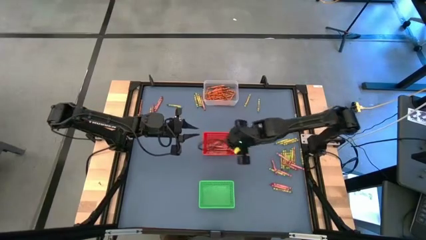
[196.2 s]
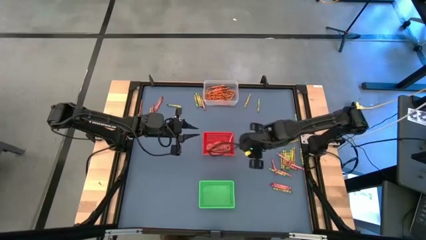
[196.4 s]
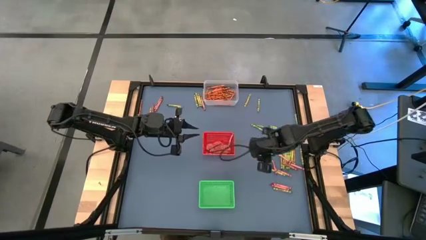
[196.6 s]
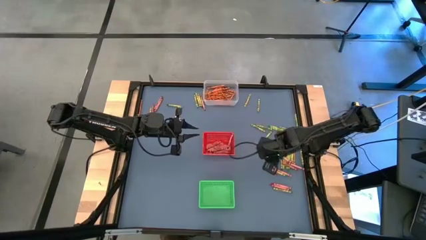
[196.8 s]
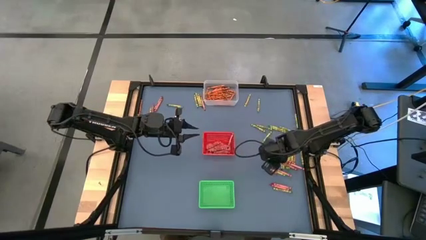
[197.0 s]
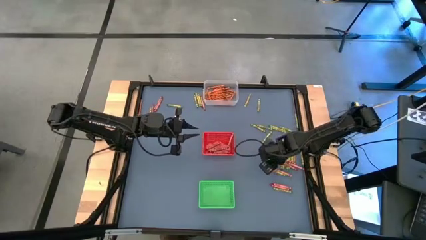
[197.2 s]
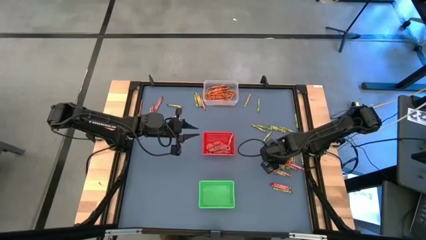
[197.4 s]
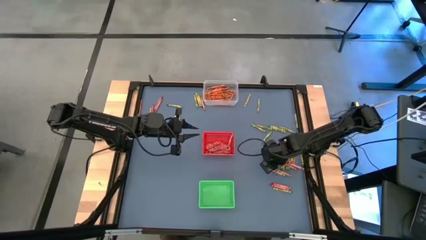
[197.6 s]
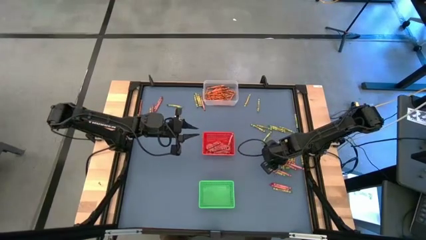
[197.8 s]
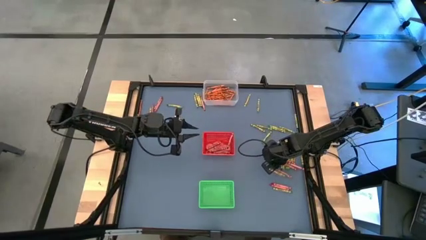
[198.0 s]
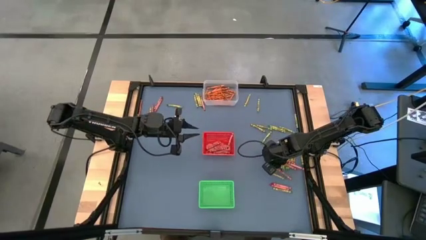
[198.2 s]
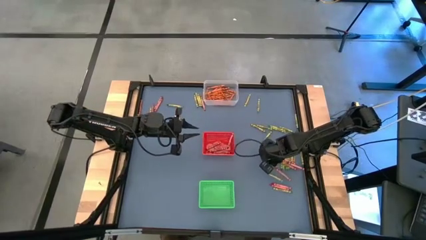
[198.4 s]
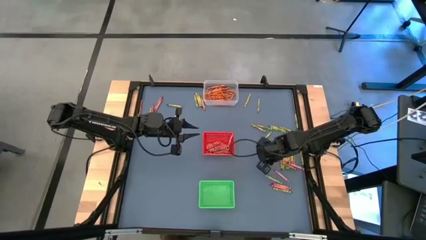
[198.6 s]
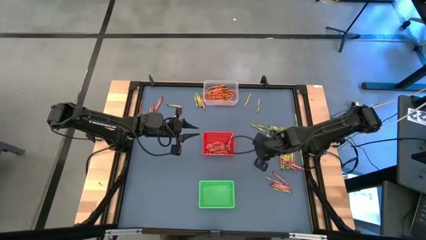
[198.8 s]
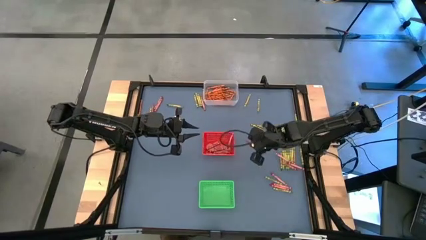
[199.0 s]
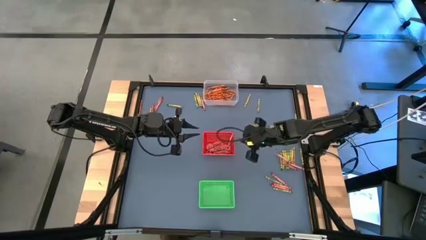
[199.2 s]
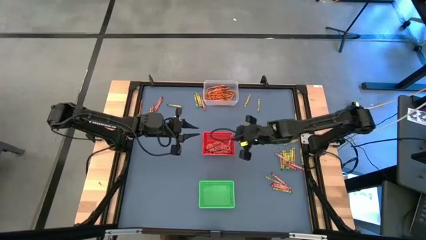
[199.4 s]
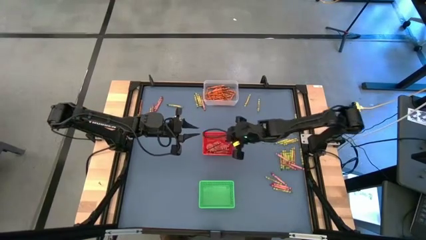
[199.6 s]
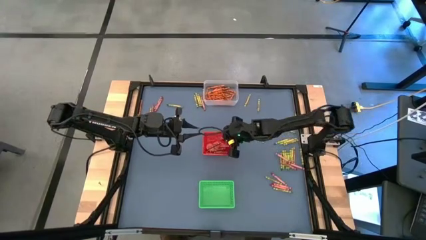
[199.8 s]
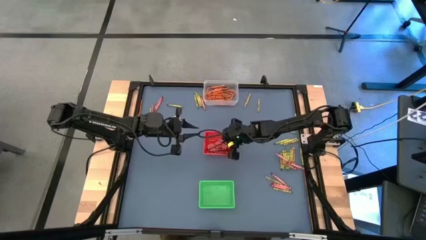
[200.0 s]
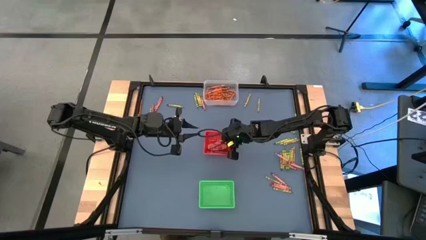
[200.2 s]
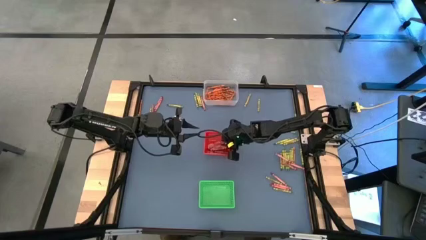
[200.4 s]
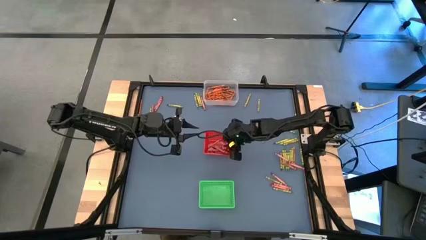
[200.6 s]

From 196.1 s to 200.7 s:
Task: Sort crayons
Put the red crayon into the red bin

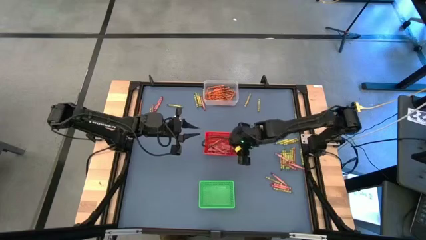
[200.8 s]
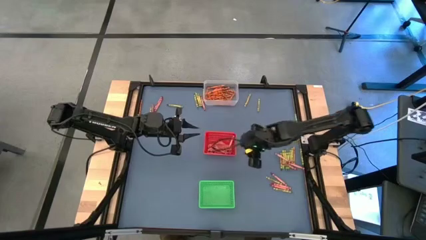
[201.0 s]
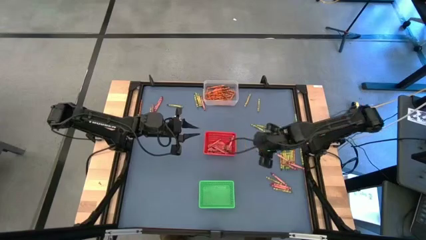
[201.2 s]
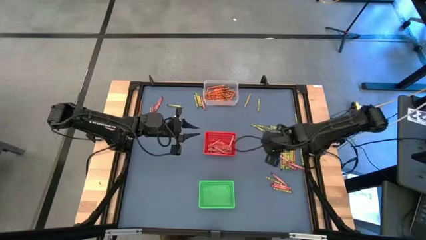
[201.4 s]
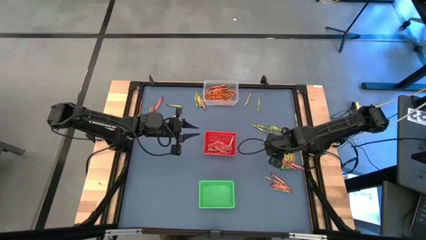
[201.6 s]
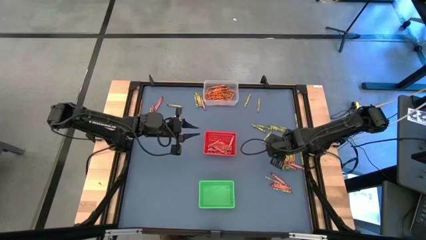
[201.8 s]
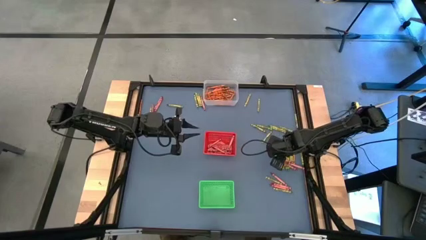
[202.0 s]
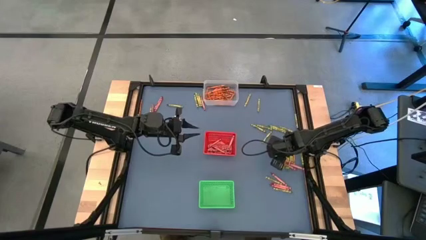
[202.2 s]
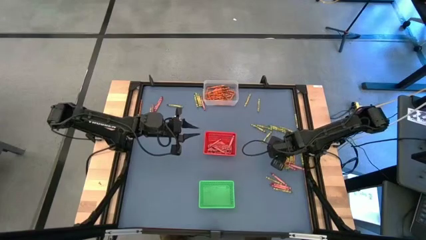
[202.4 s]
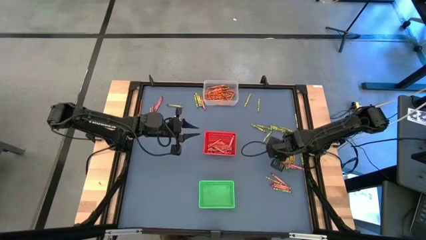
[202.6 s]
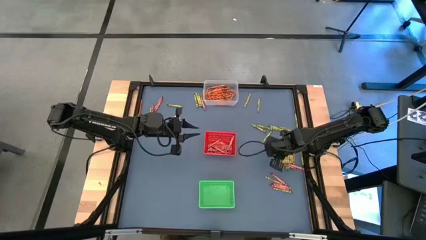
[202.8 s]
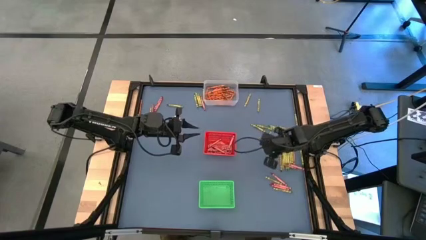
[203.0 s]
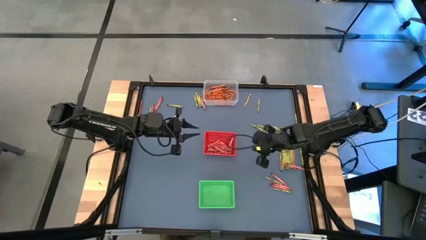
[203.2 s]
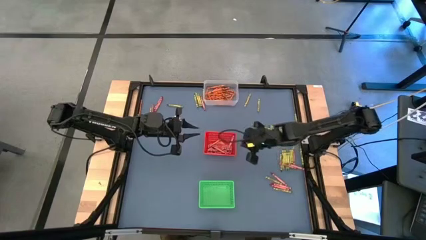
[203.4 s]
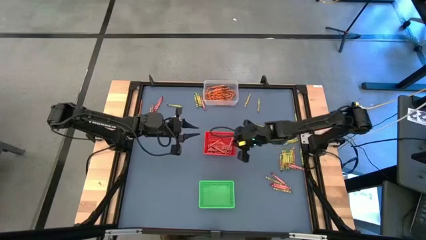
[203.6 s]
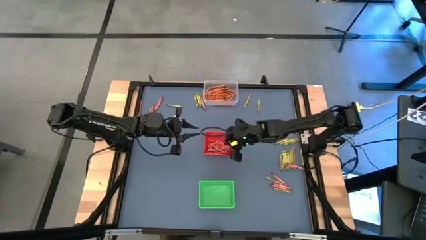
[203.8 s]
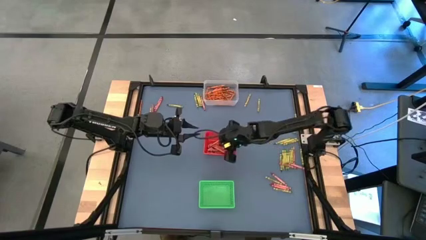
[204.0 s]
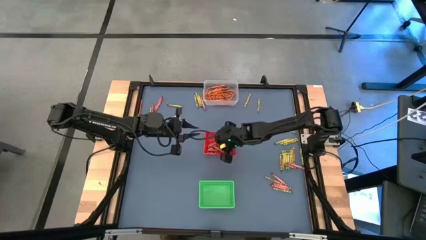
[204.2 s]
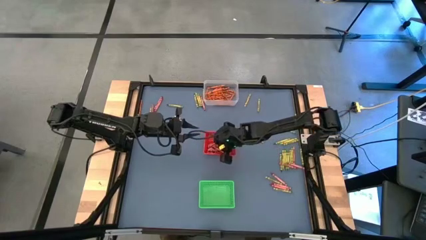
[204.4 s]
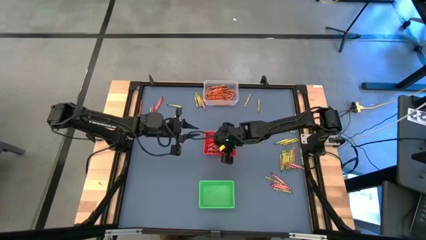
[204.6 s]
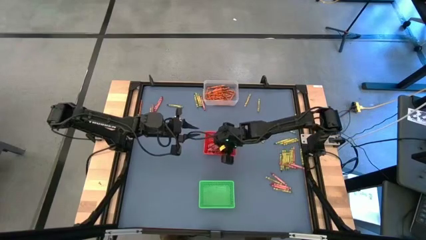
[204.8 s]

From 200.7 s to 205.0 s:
Put the red crayon into the red bin

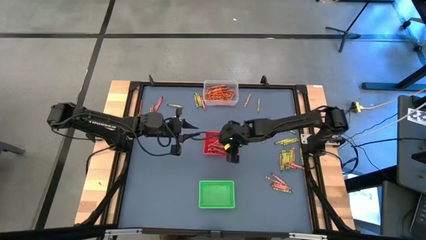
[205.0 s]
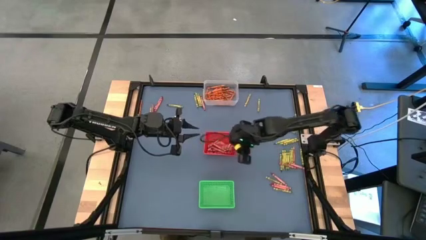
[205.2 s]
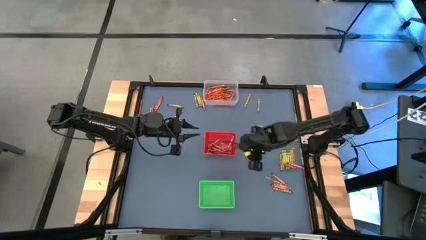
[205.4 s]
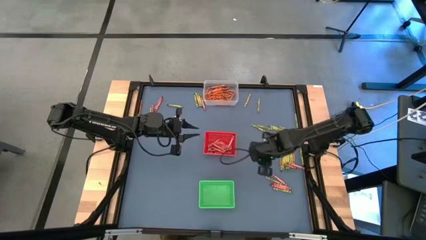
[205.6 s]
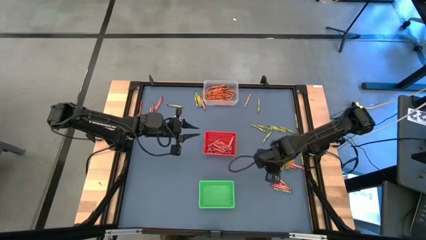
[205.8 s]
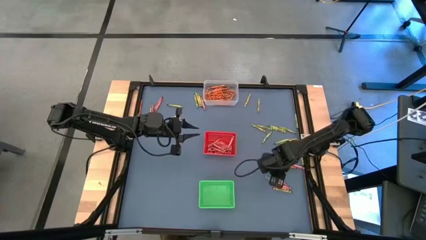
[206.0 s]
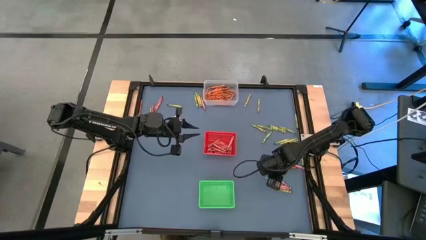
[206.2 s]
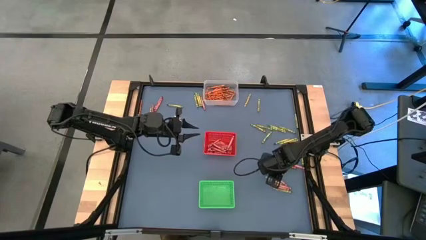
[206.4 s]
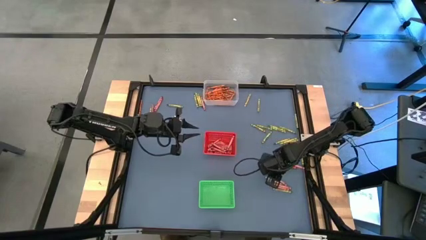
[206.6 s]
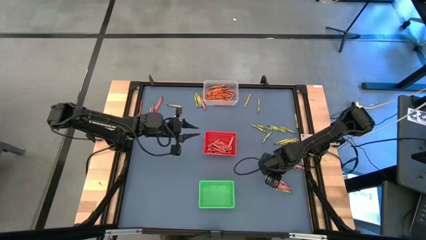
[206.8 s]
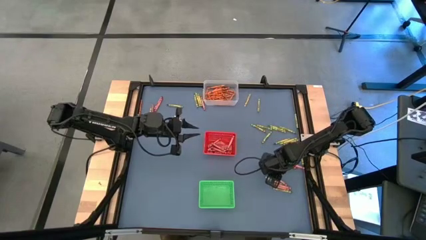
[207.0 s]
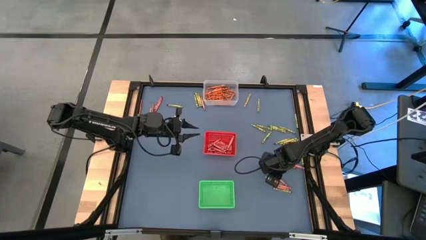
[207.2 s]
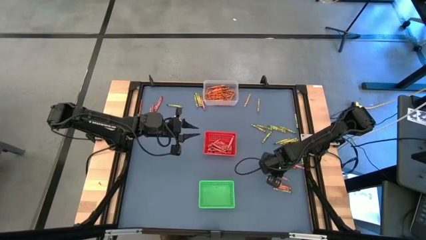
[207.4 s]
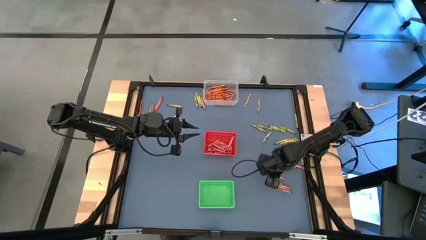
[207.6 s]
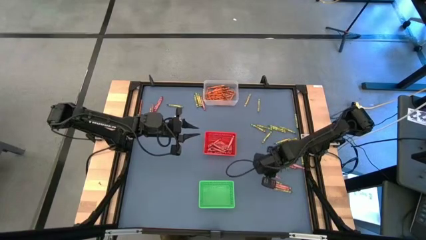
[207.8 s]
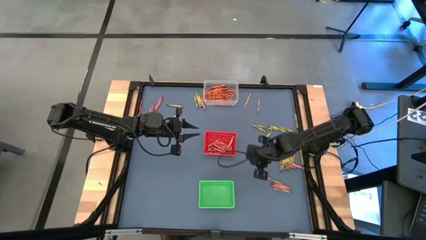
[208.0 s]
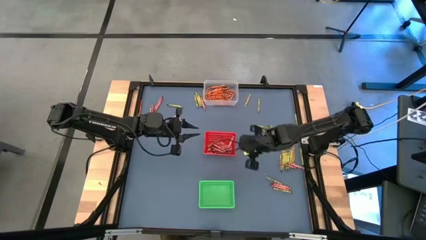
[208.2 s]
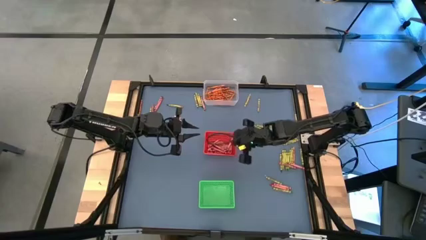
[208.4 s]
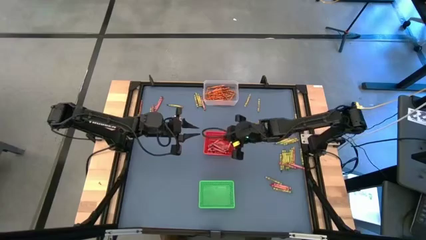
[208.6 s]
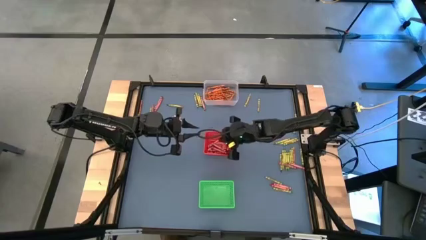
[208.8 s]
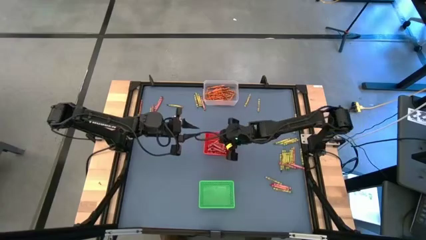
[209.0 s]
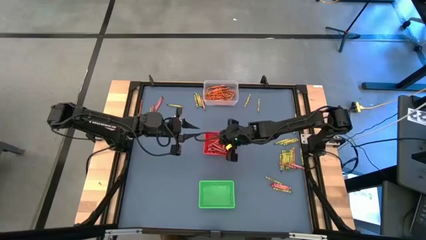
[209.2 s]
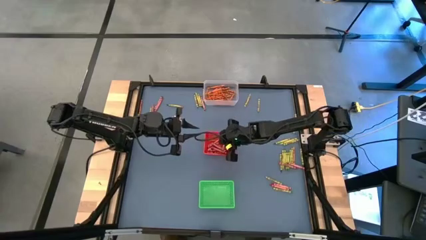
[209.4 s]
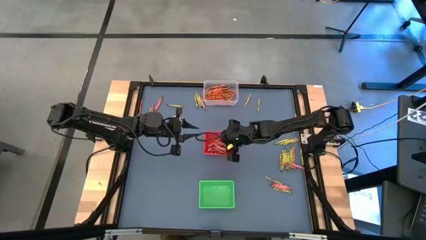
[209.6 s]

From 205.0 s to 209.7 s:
Put the red crayon into the red bin

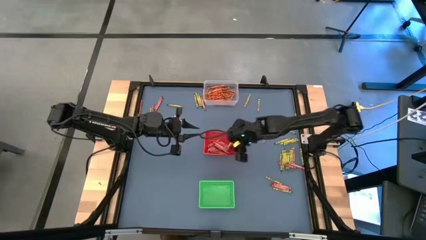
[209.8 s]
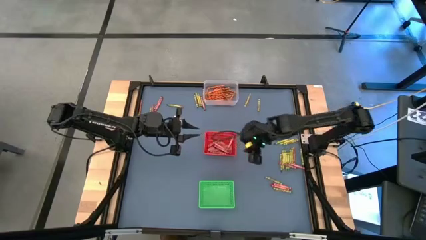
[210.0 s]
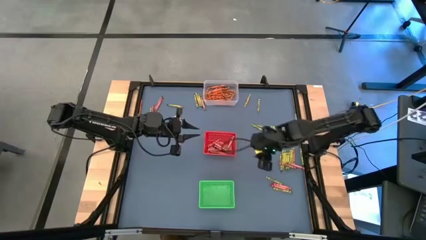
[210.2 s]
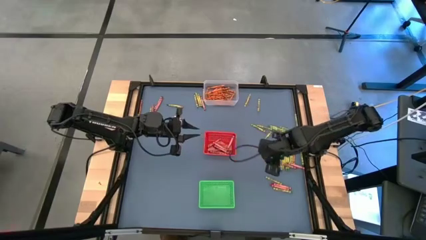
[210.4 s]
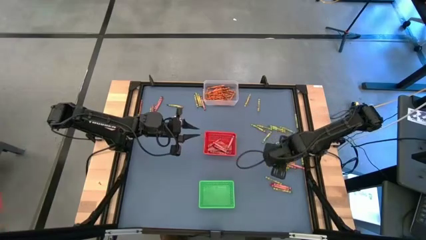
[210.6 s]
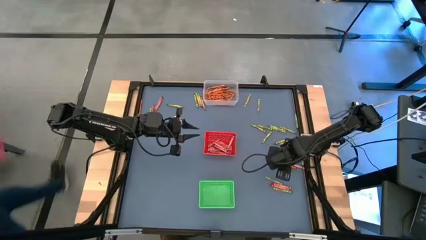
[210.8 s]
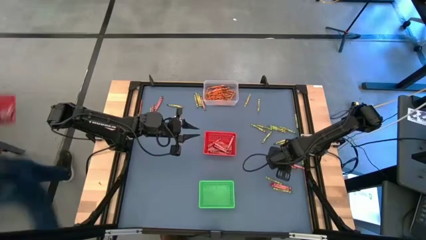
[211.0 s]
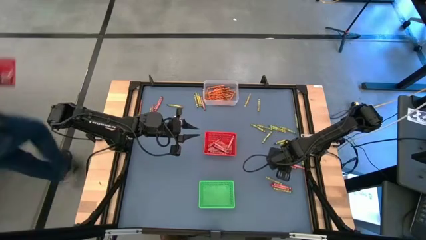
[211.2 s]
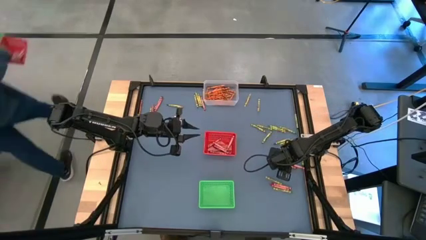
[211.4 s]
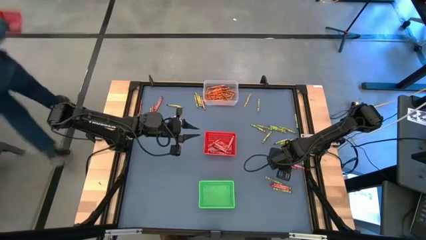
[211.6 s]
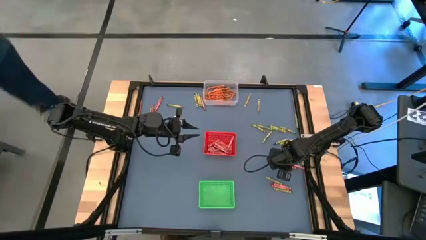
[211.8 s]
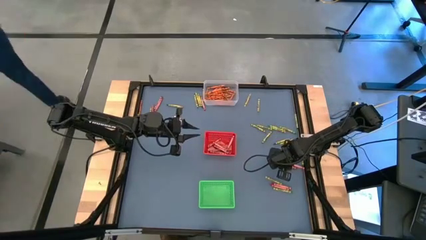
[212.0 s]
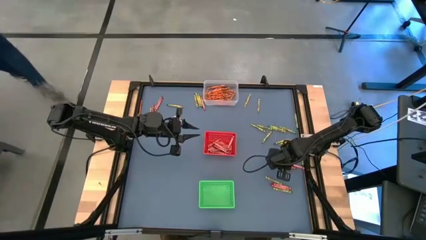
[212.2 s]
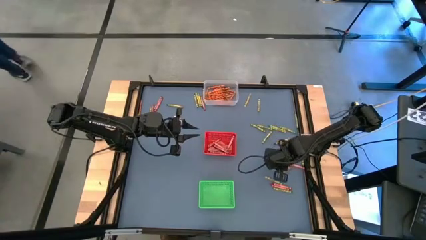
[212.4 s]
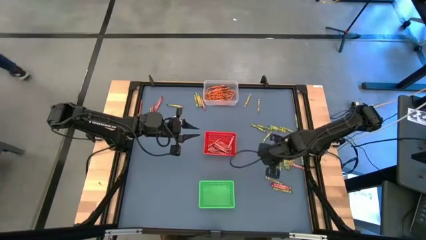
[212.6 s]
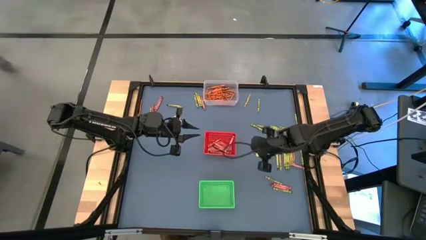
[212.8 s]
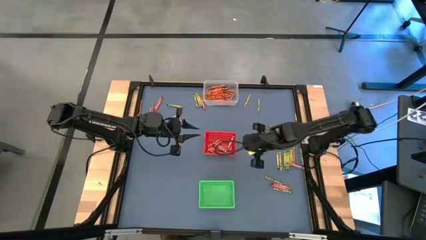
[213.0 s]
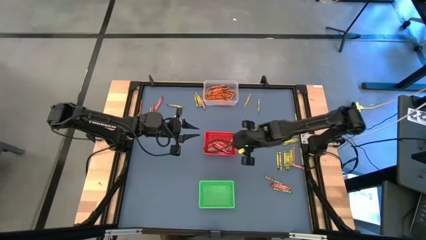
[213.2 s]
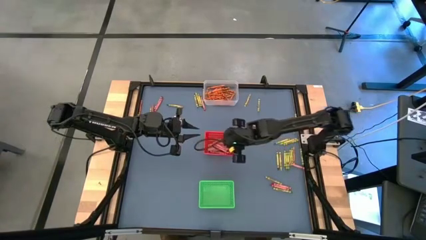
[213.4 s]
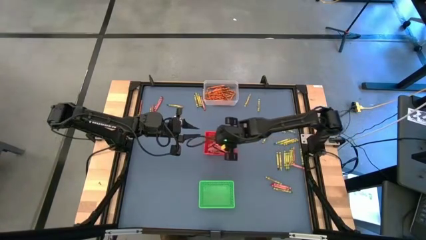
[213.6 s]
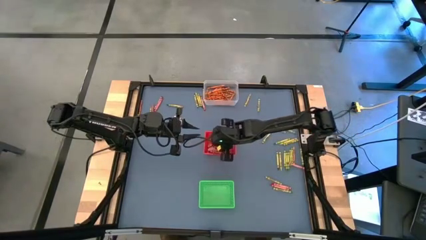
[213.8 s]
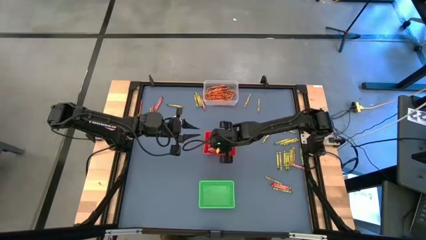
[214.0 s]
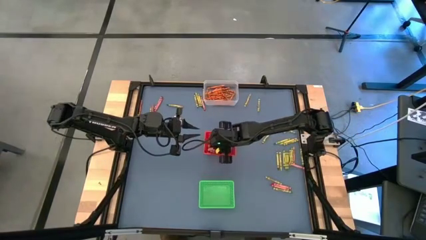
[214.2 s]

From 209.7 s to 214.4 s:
Put the red crayon into the red bin
